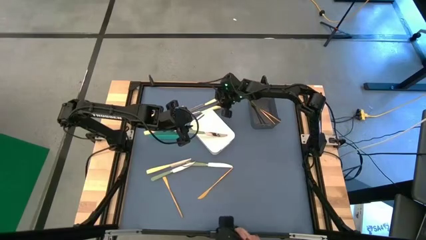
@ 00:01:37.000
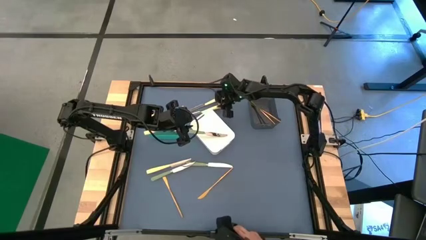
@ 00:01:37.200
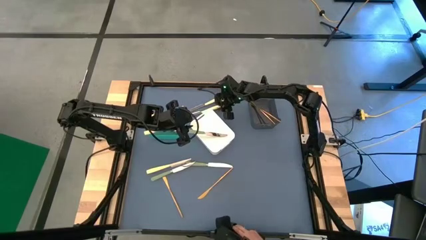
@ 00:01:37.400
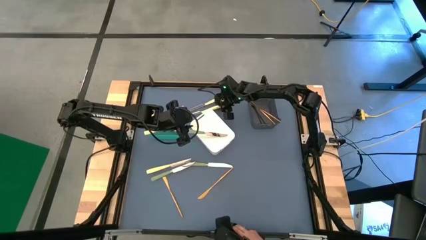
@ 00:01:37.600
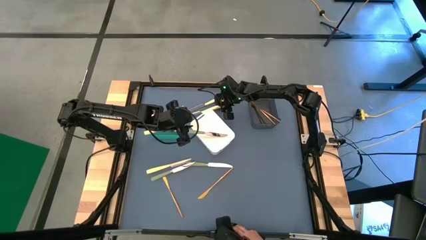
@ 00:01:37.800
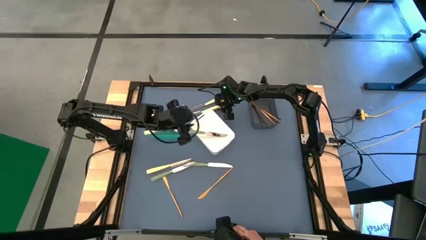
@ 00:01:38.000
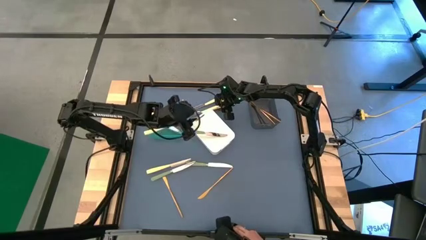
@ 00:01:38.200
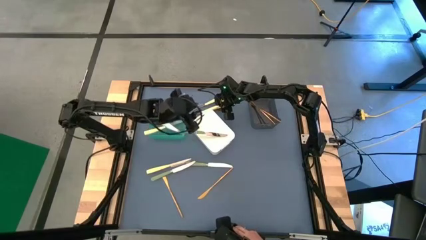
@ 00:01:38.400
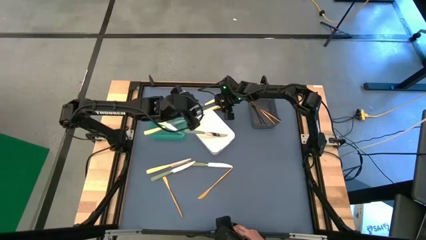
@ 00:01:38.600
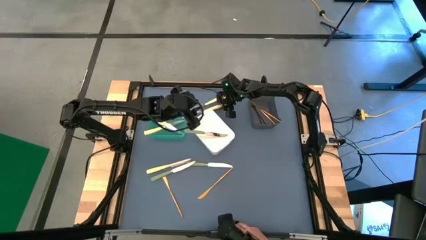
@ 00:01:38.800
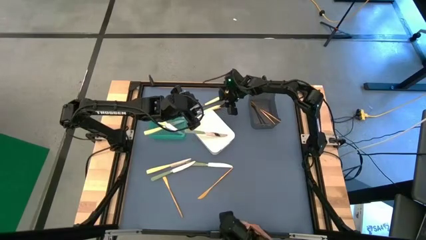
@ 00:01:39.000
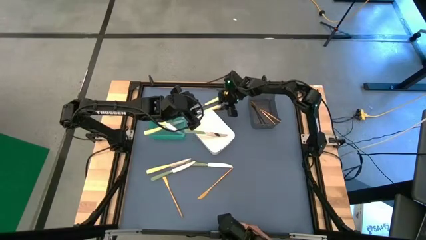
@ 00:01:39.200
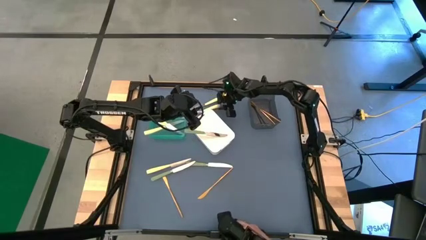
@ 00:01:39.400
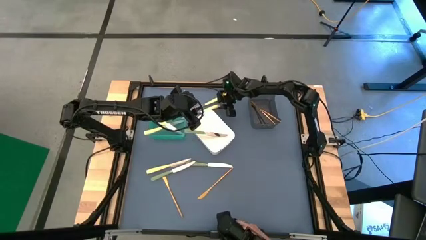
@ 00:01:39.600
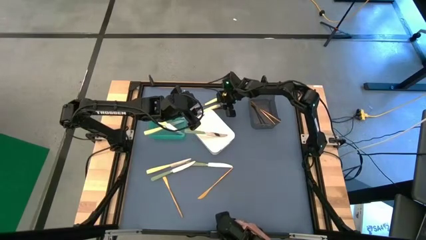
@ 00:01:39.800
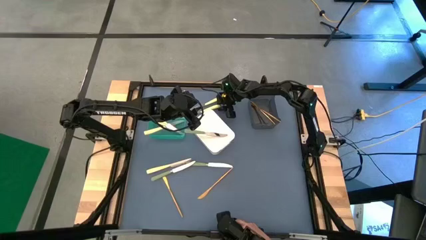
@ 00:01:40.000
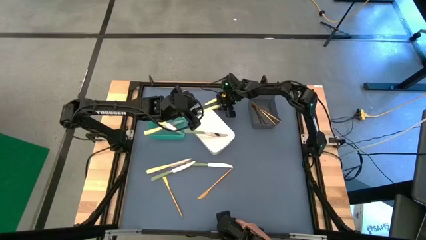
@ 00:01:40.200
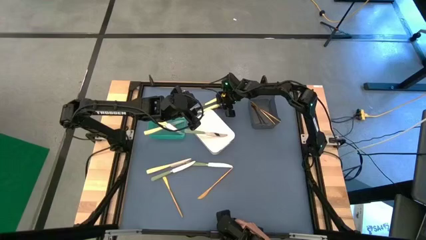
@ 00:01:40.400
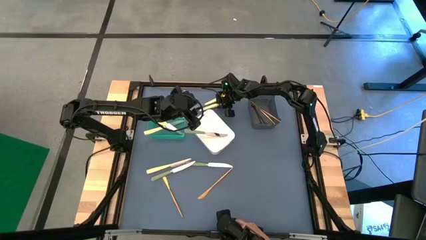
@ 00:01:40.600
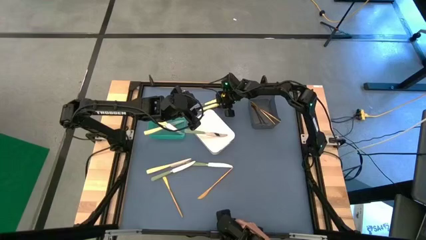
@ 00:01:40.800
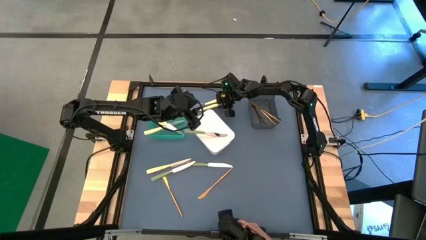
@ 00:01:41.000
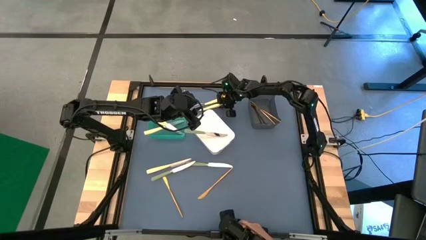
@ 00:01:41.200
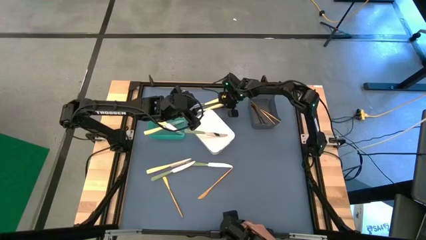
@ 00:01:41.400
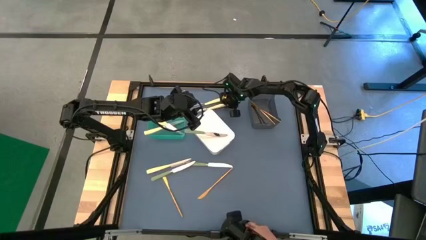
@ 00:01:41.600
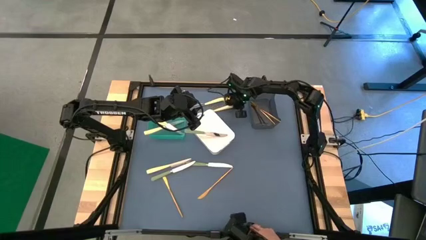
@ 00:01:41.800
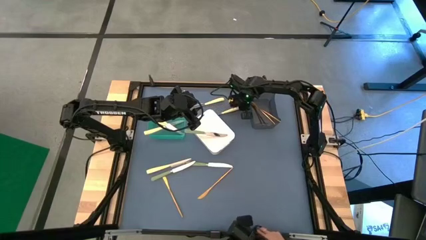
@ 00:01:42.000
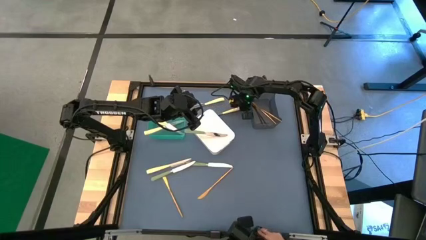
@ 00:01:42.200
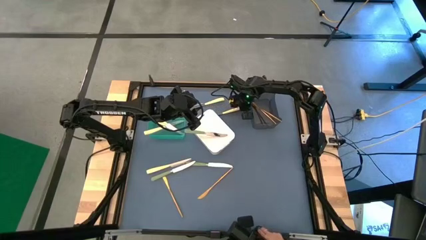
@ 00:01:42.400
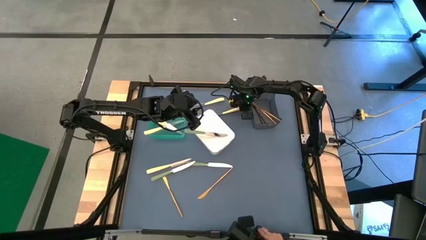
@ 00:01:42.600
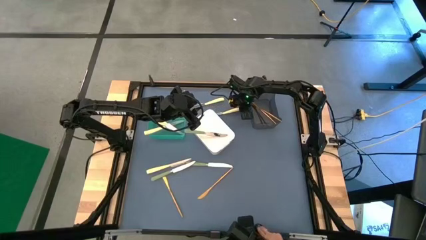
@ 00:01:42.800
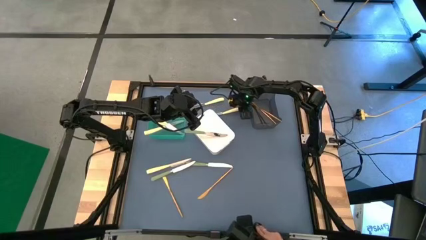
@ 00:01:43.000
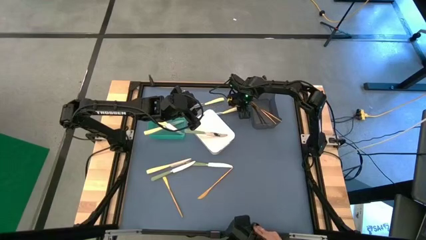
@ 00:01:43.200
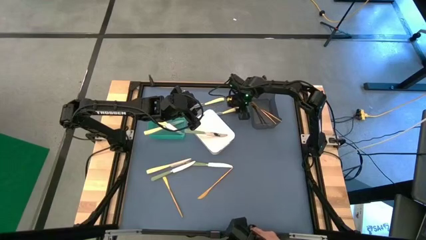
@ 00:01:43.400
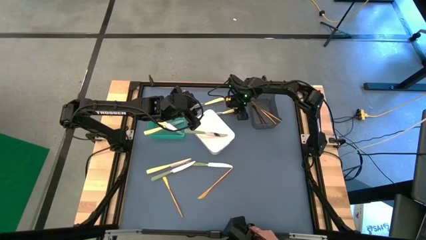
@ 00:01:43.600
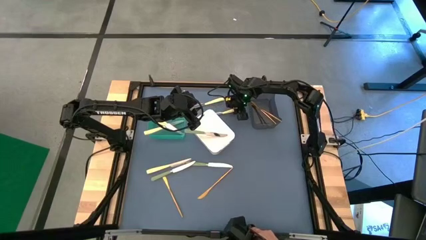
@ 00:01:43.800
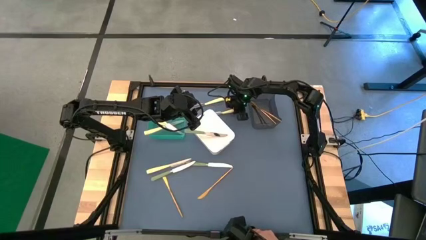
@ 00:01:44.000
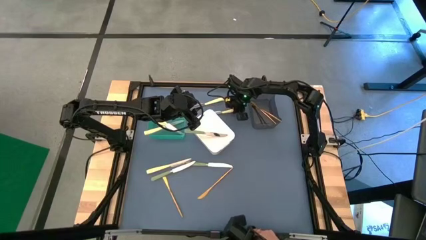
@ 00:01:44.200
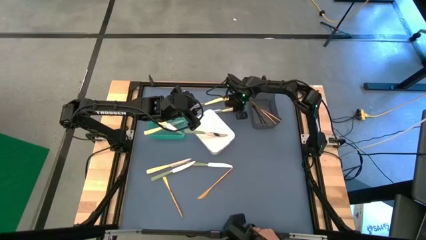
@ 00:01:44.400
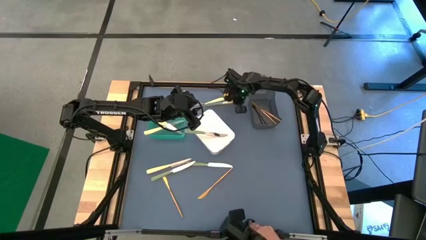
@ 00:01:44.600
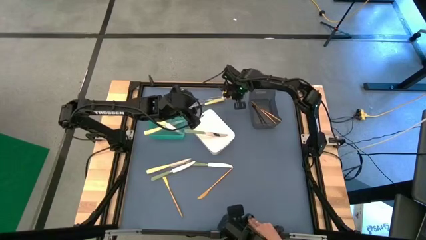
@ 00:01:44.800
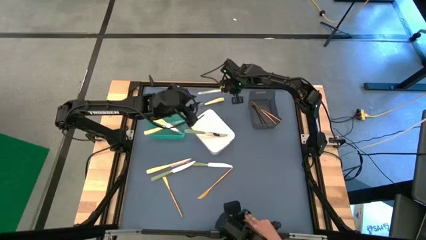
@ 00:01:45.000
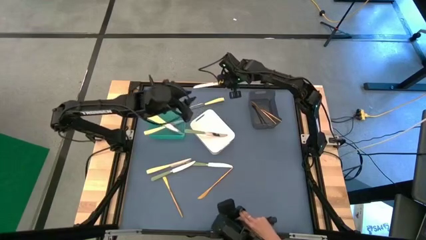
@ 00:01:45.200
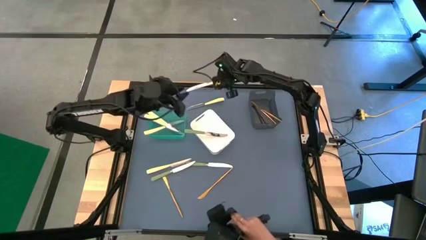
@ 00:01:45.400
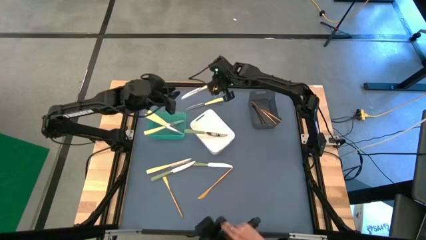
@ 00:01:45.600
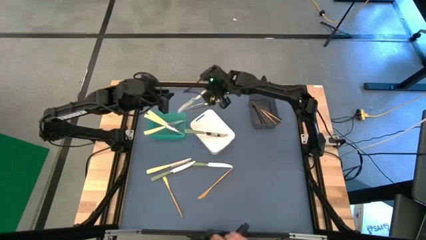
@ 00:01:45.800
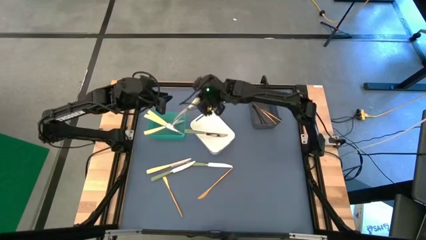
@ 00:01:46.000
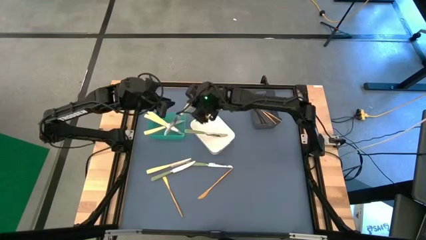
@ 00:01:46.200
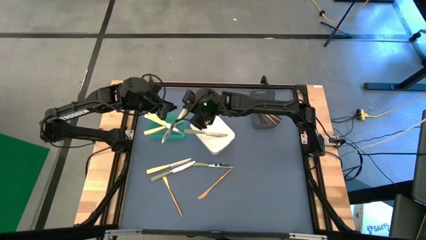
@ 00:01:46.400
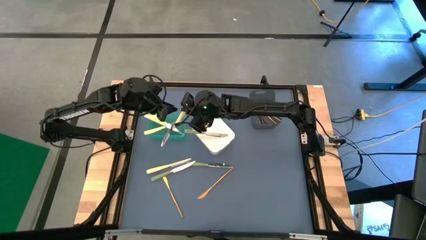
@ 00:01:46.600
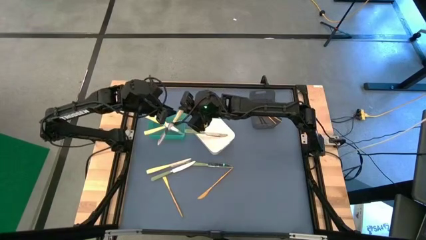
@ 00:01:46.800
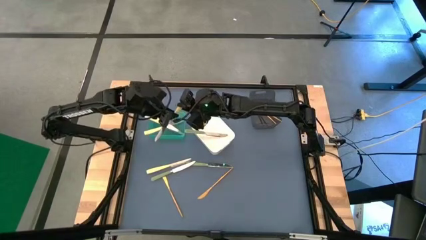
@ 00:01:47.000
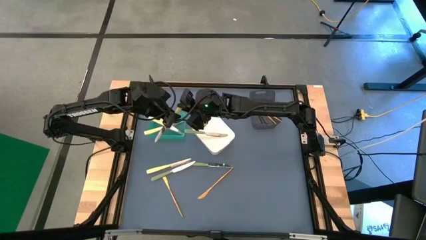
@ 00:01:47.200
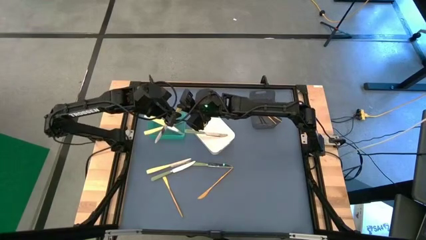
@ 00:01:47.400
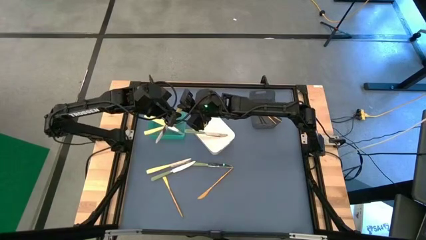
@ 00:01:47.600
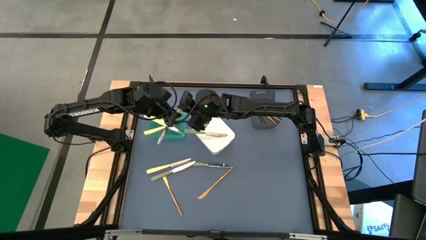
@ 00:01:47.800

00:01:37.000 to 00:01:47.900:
Task: Sort silverware by color (type)
Put the top yellow table knife into the green bin
